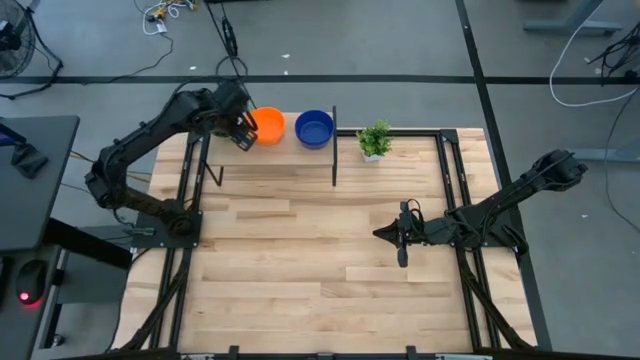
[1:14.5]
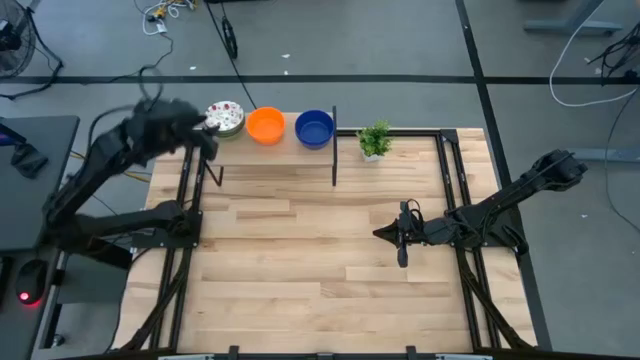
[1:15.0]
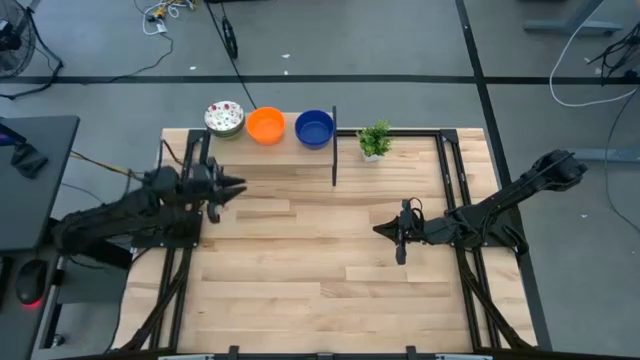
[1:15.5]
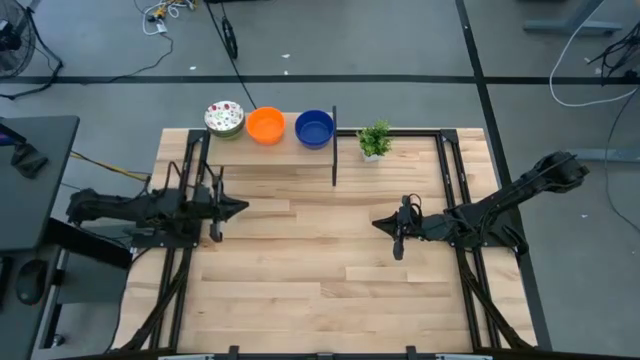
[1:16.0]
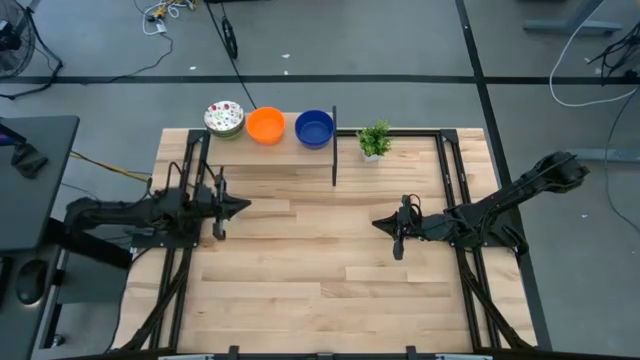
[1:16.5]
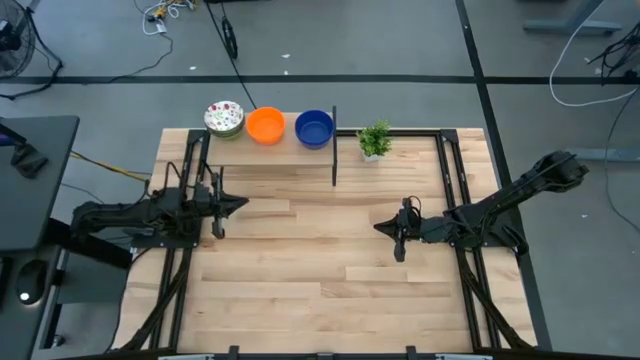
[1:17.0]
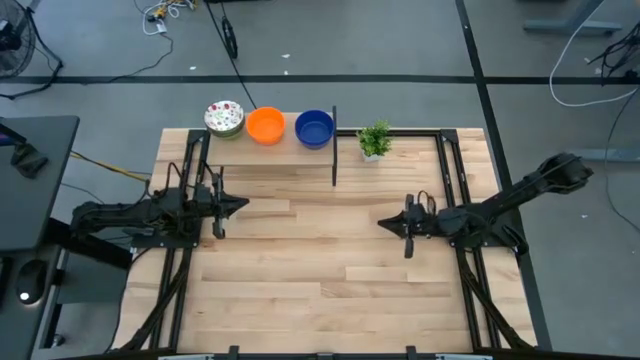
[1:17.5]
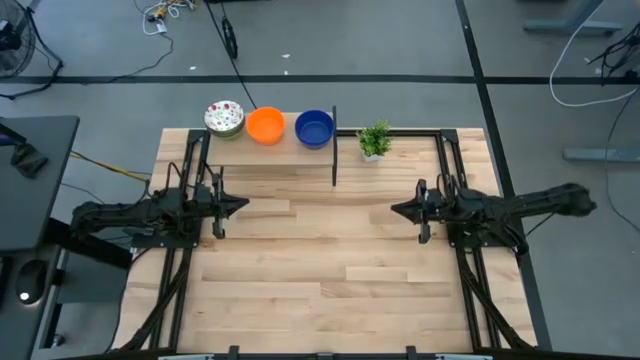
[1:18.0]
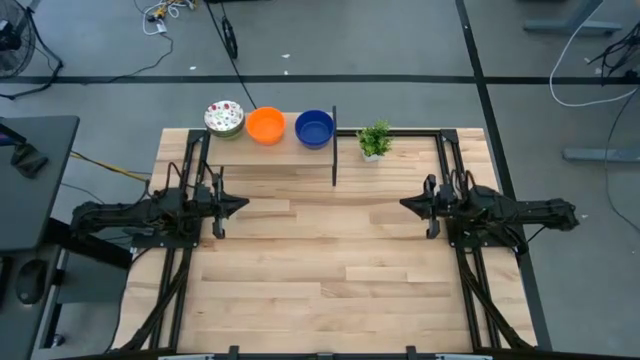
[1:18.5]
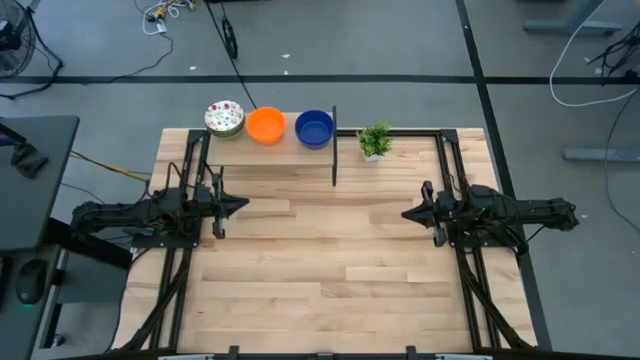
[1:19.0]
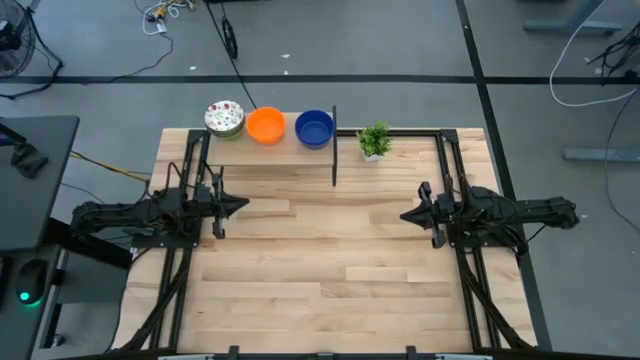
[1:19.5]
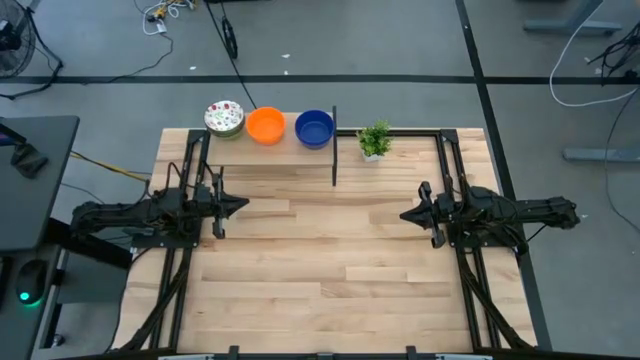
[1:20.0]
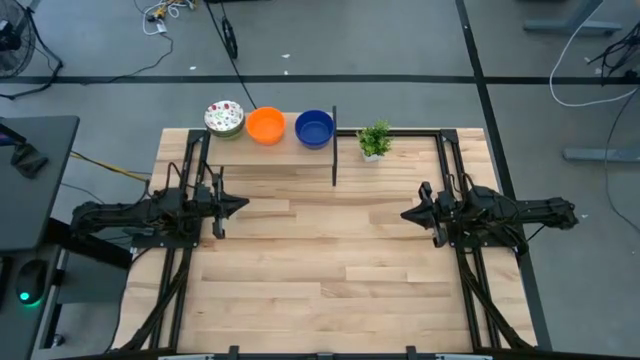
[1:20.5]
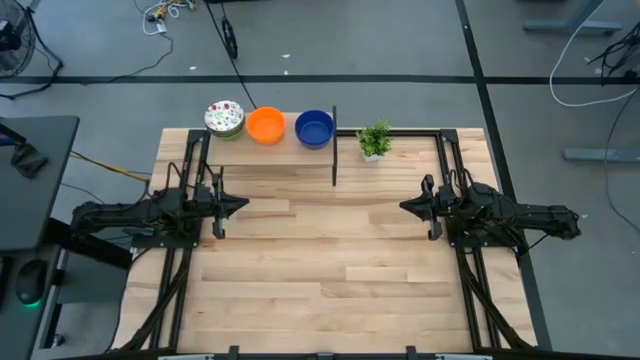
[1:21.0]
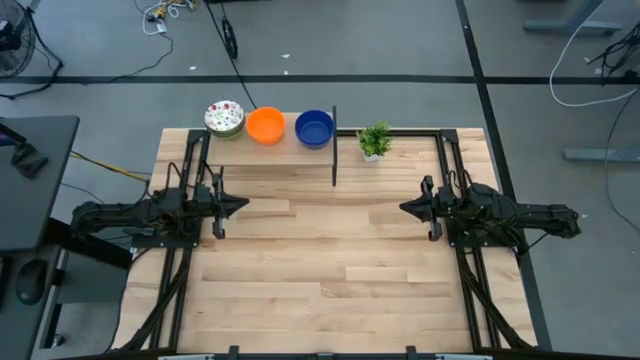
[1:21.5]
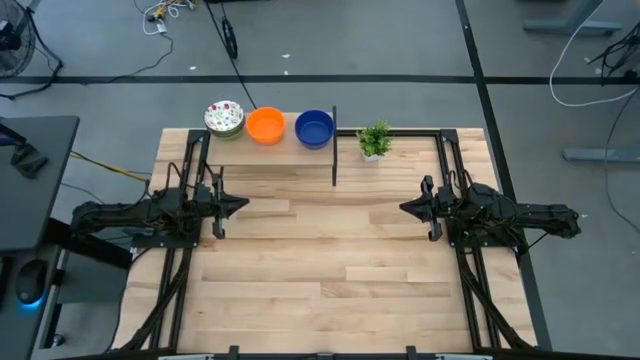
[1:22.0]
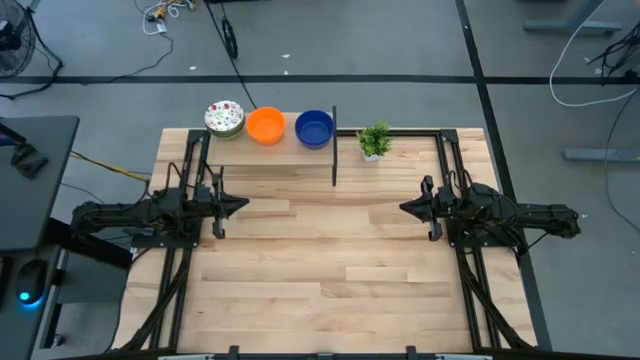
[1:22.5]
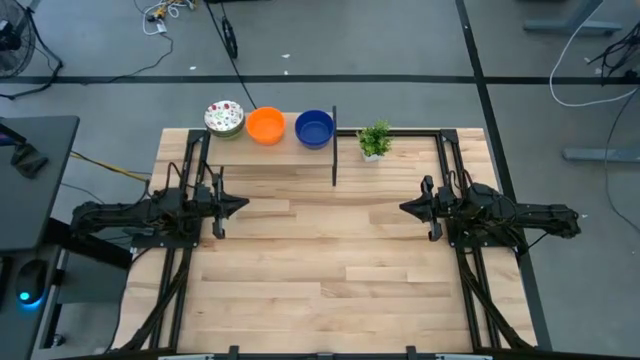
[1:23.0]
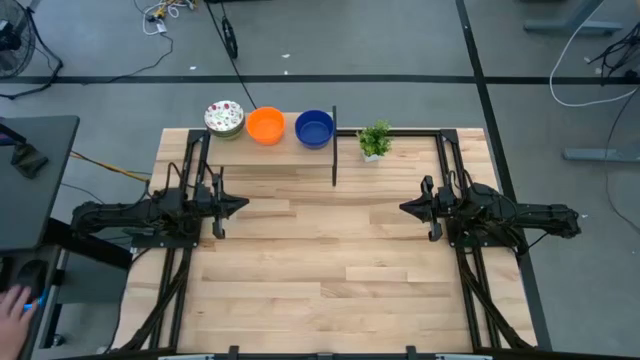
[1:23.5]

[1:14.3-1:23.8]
Task: Pick & Place Mini bowls
Return to Home Position

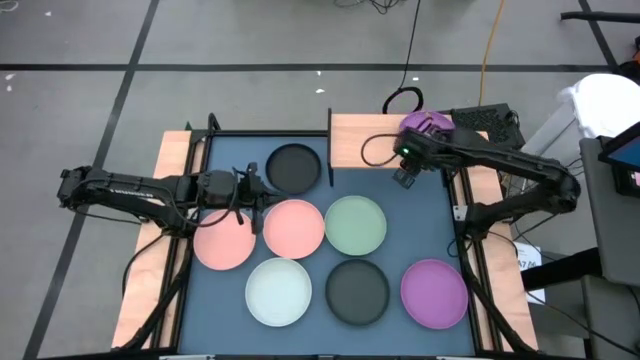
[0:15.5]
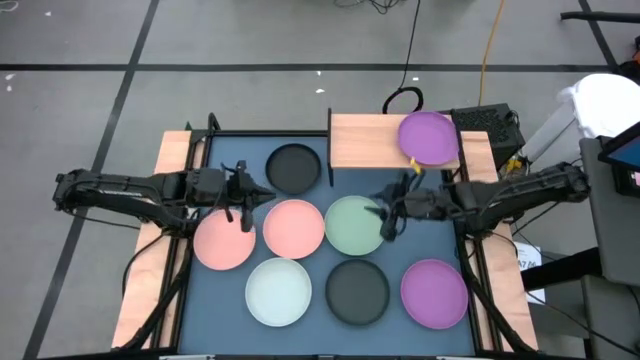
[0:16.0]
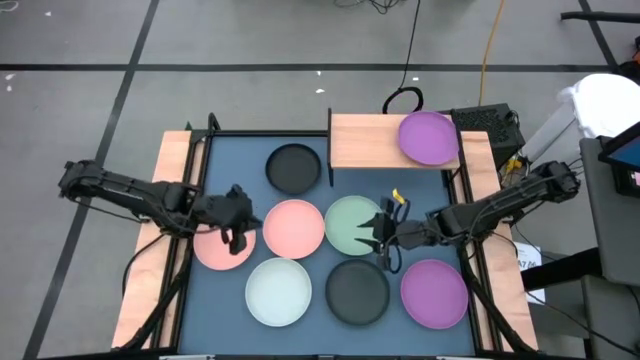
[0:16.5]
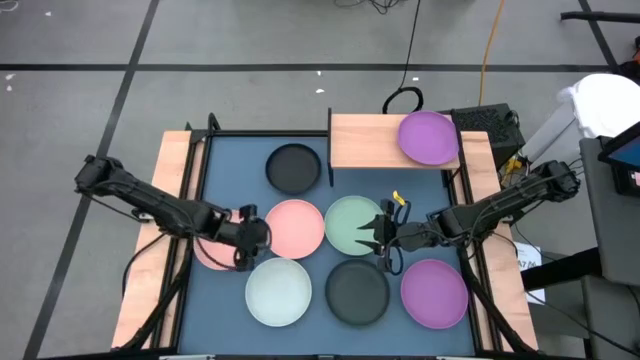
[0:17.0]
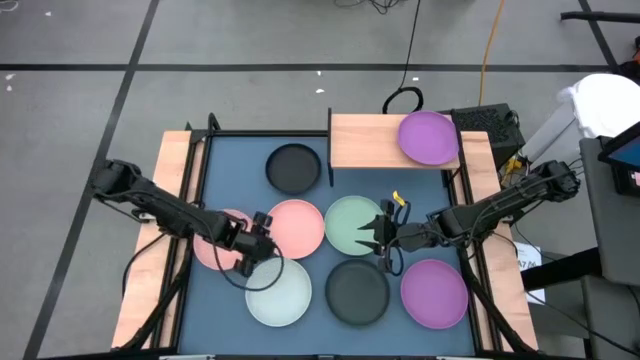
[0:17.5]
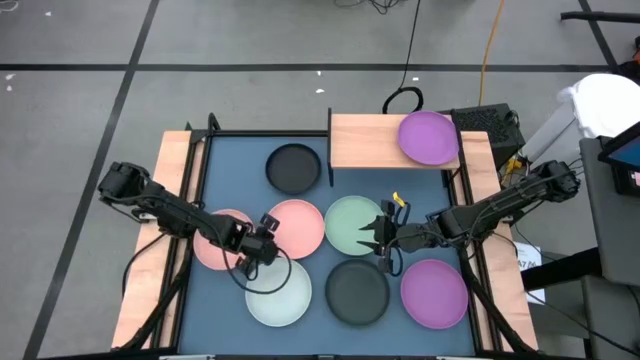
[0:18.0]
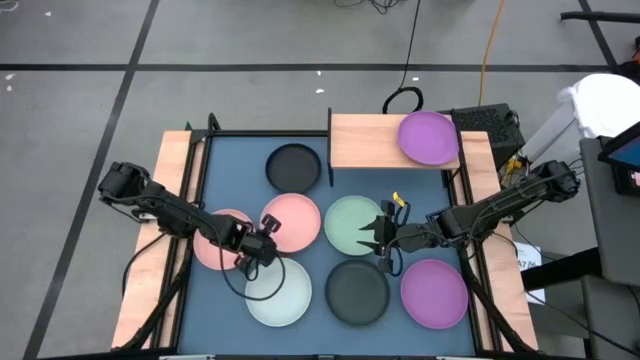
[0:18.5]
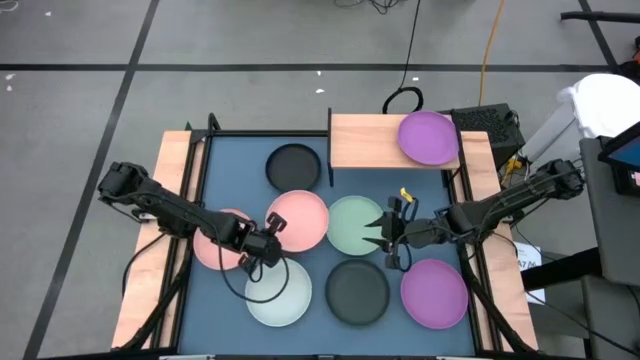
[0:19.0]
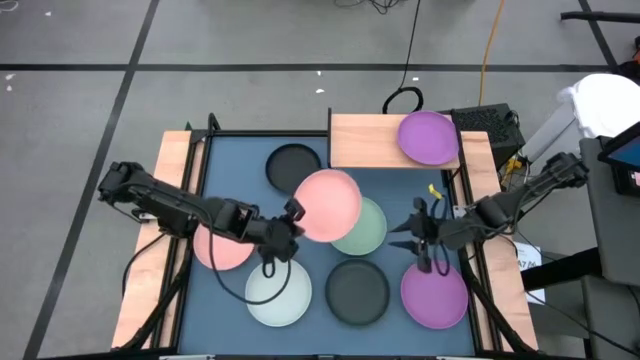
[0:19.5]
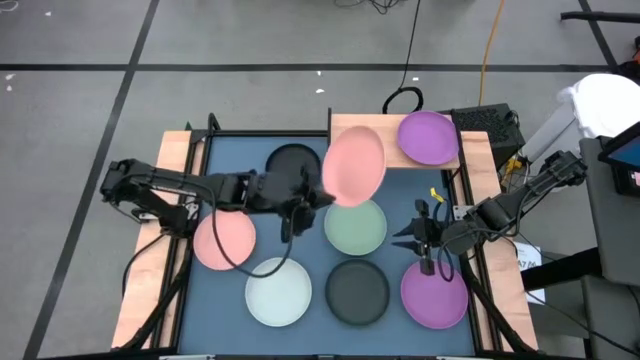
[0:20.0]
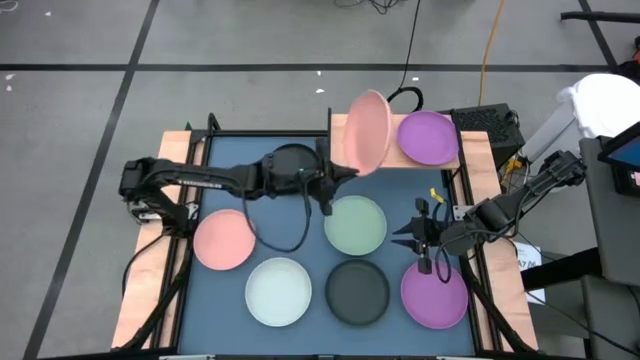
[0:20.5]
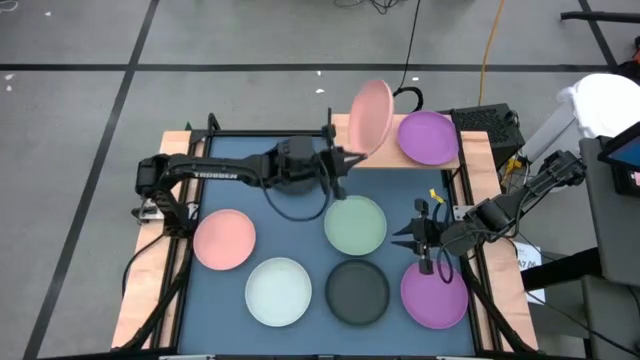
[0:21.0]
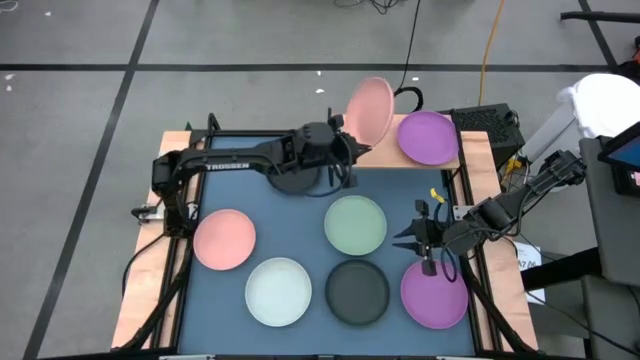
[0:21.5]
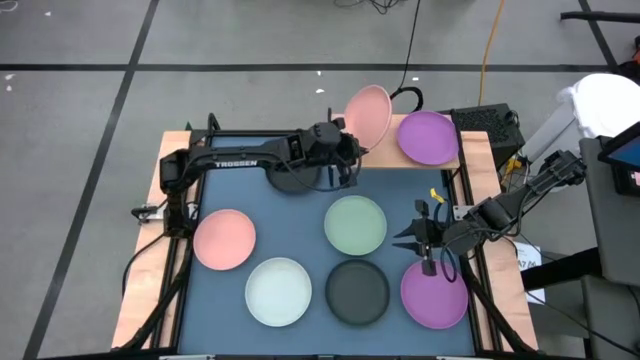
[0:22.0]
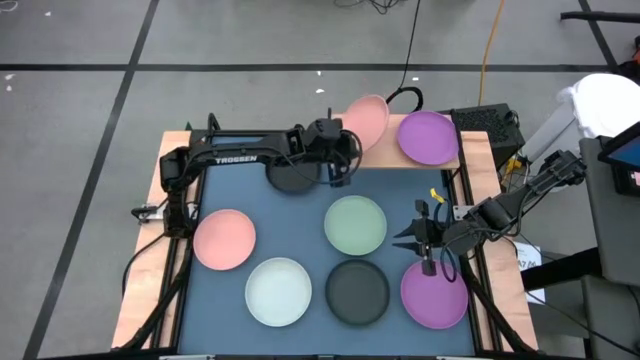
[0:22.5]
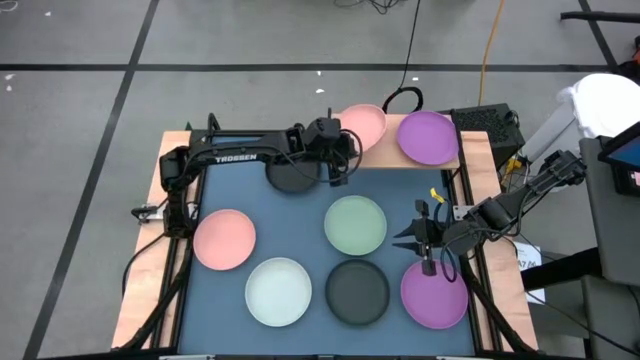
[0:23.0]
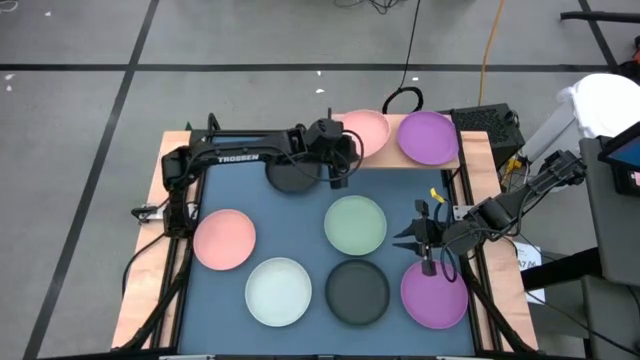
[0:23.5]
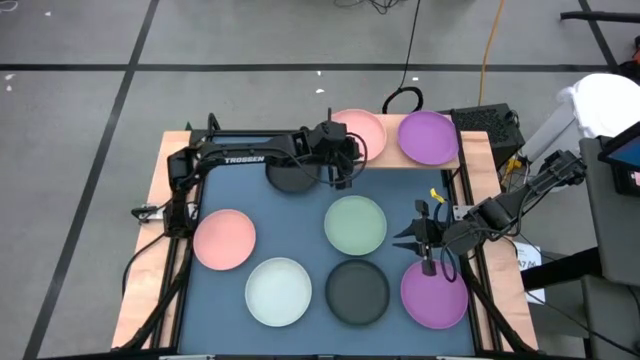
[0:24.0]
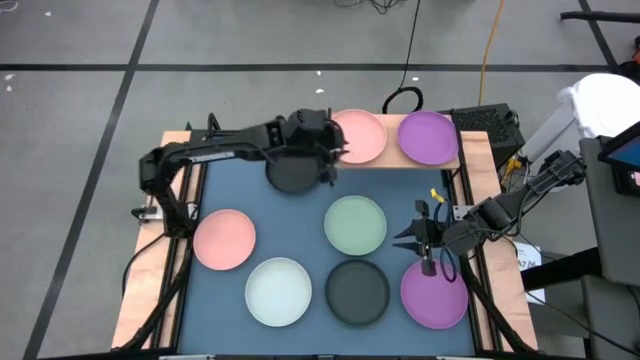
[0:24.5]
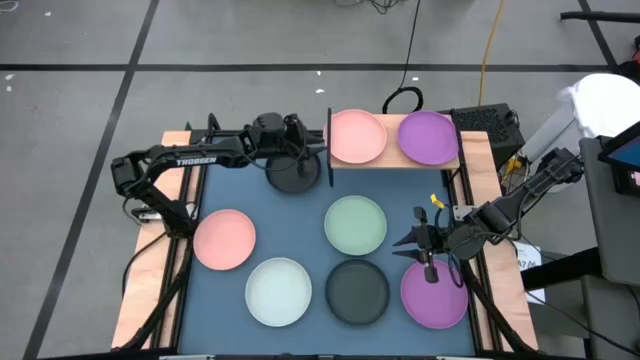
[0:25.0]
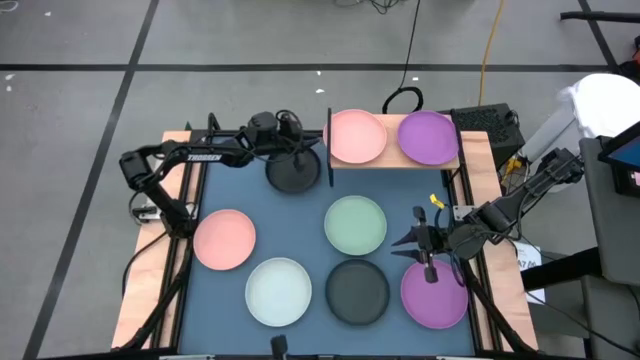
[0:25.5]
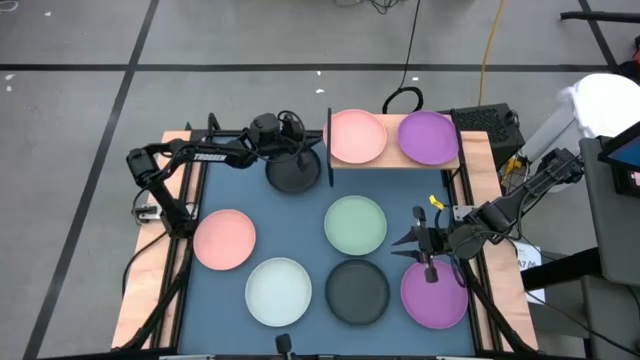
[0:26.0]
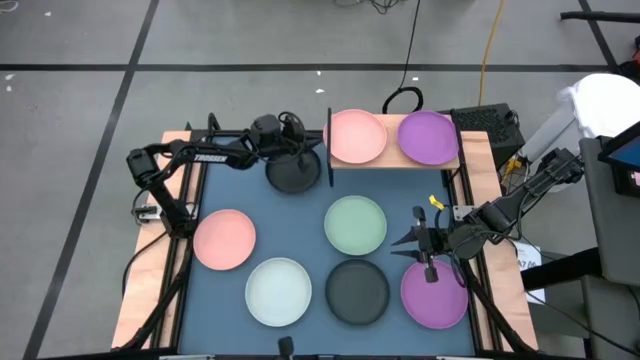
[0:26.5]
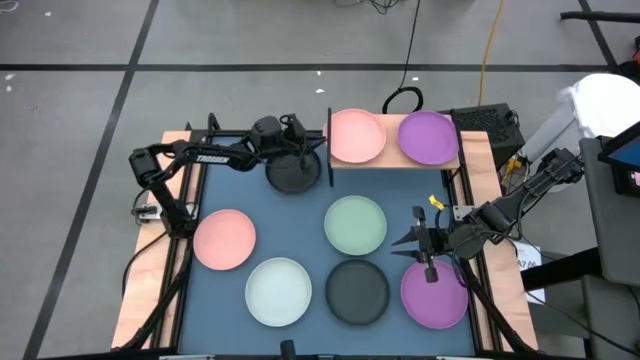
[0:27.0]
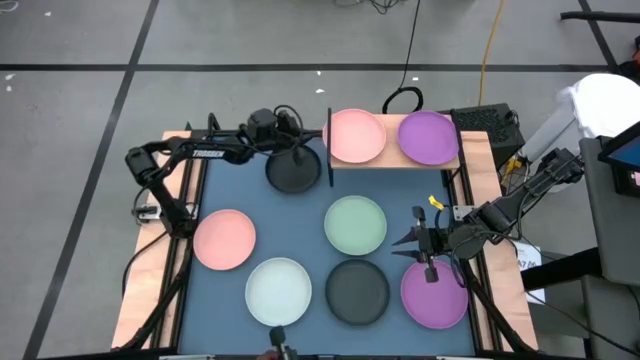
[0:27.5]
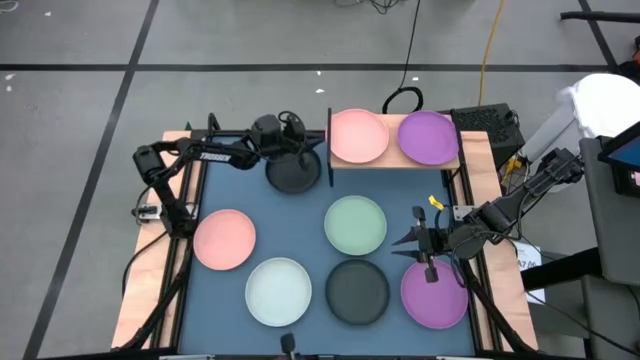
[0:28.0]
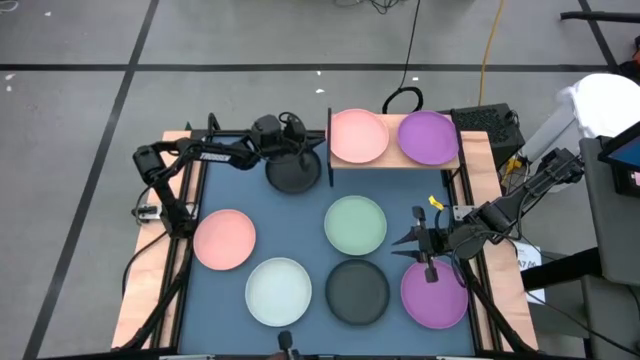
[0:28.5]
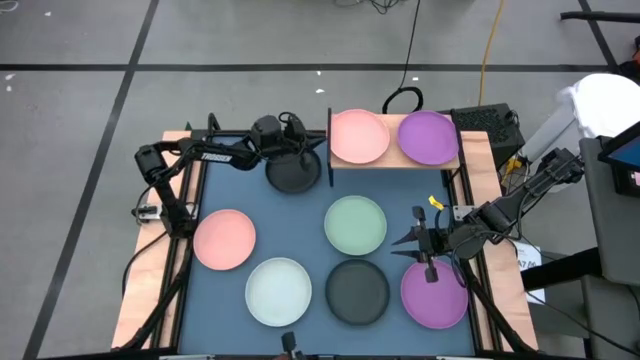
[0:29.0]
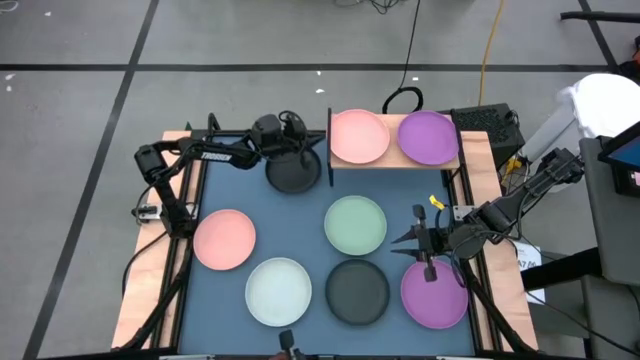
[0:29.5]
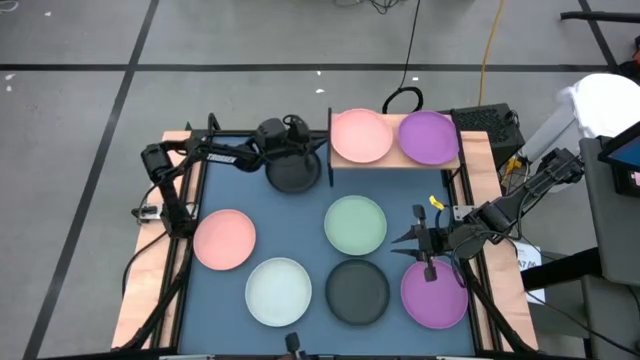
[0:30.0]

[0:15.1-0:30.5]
Task: Place and stack plates onto a shelf
Put the right pink plate on the shelf
